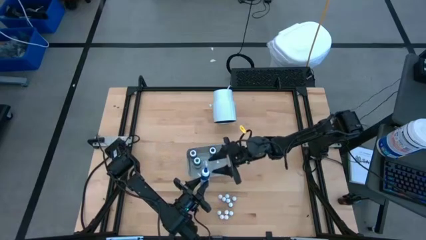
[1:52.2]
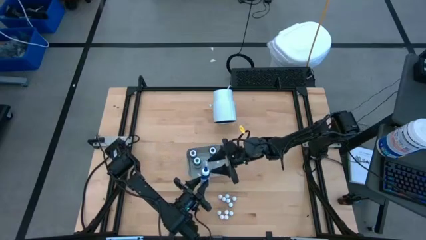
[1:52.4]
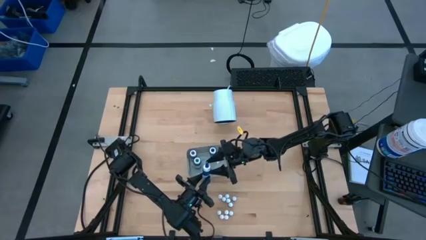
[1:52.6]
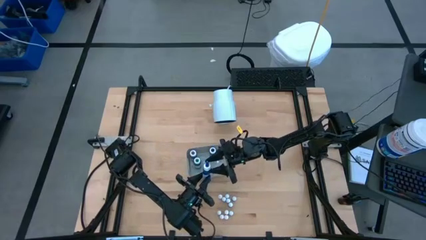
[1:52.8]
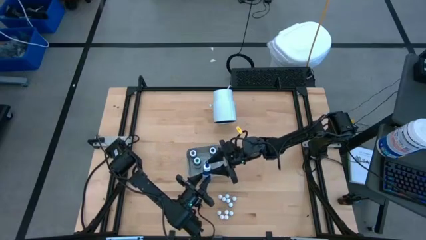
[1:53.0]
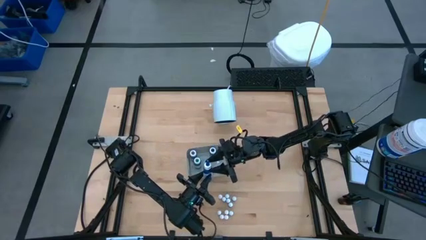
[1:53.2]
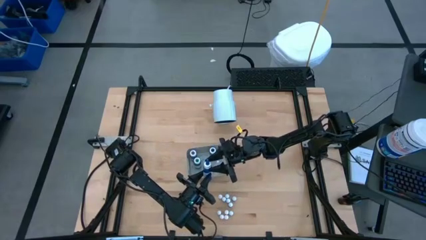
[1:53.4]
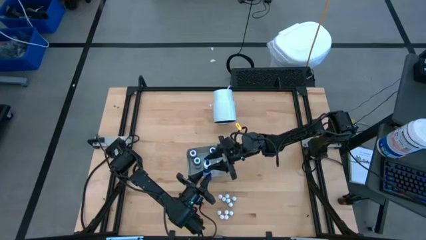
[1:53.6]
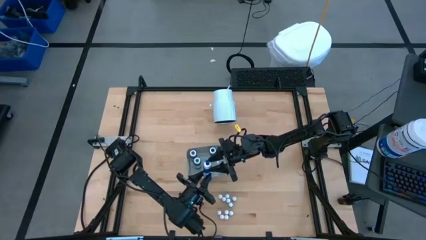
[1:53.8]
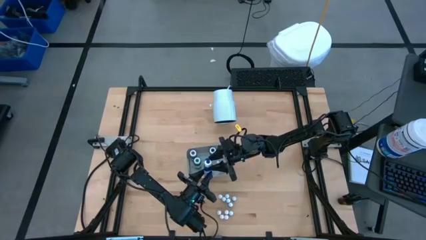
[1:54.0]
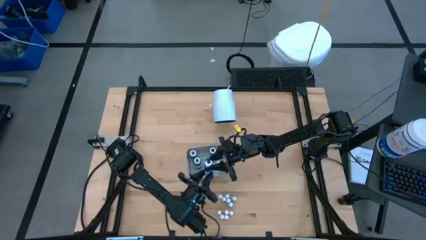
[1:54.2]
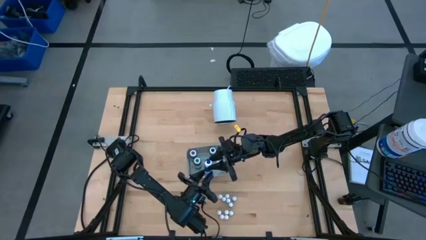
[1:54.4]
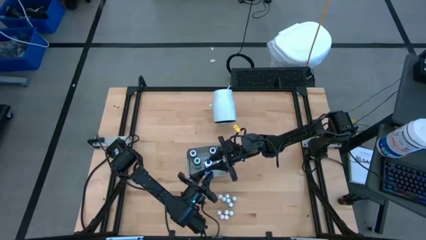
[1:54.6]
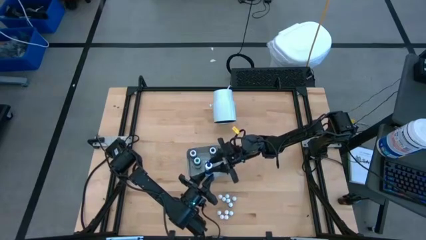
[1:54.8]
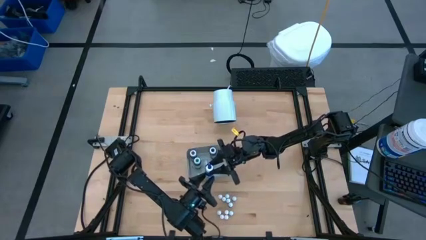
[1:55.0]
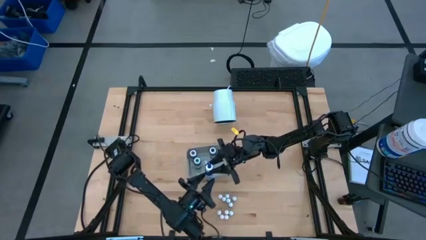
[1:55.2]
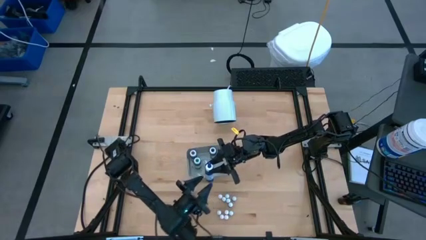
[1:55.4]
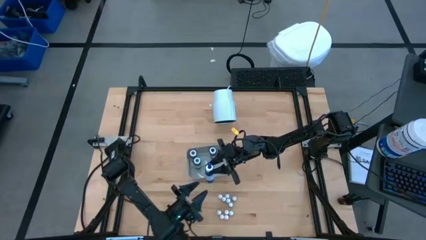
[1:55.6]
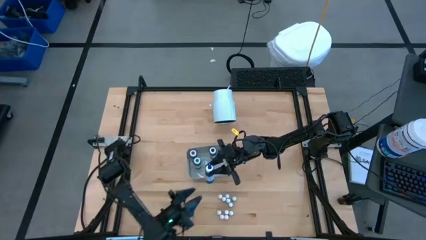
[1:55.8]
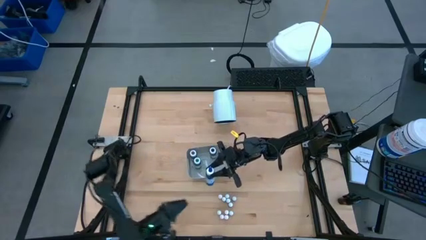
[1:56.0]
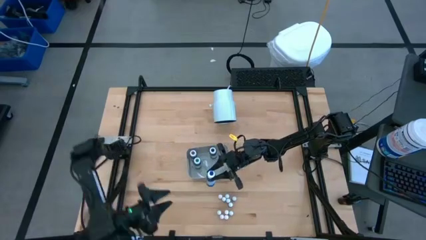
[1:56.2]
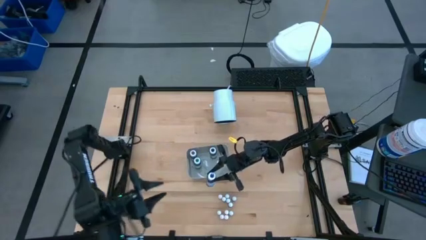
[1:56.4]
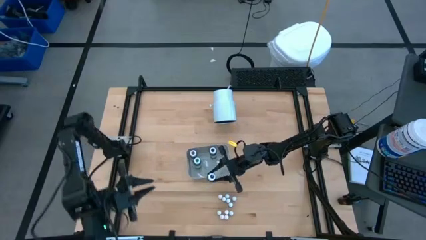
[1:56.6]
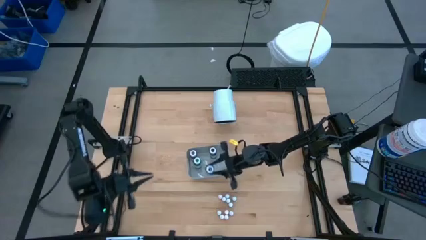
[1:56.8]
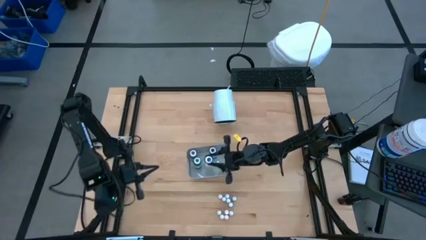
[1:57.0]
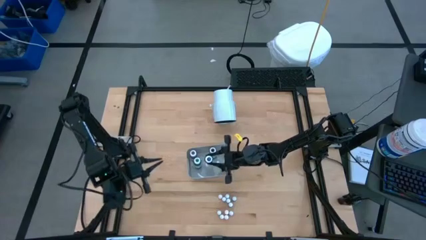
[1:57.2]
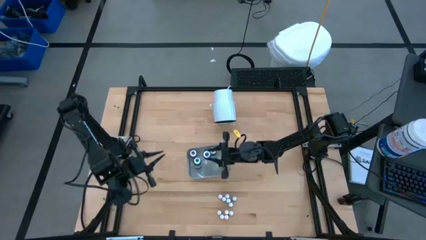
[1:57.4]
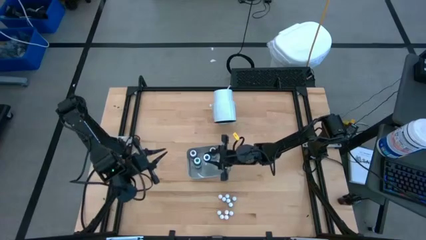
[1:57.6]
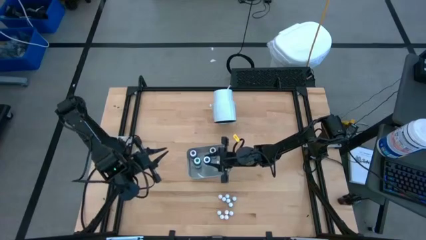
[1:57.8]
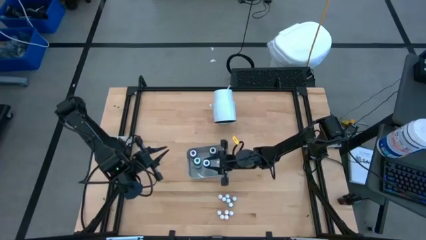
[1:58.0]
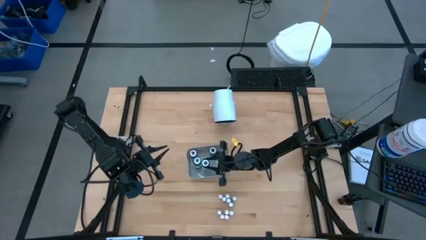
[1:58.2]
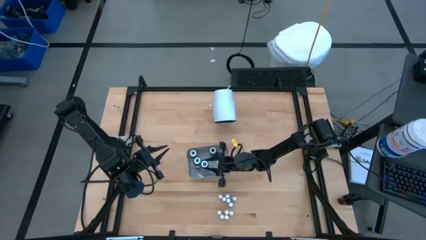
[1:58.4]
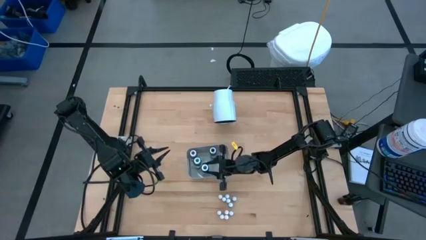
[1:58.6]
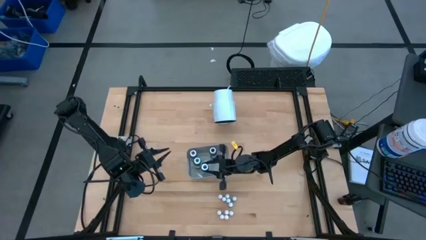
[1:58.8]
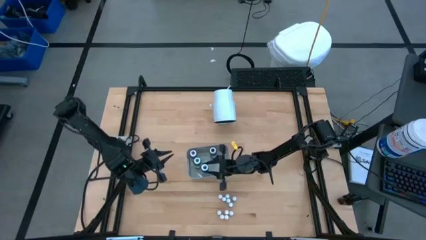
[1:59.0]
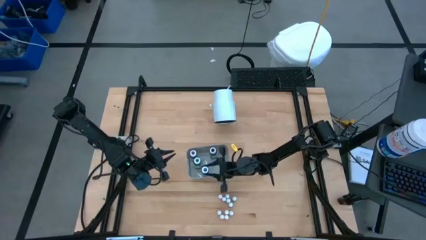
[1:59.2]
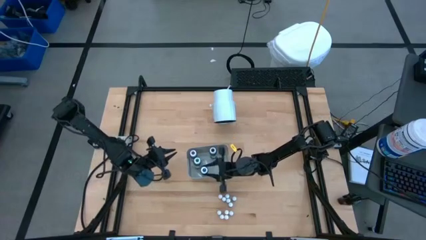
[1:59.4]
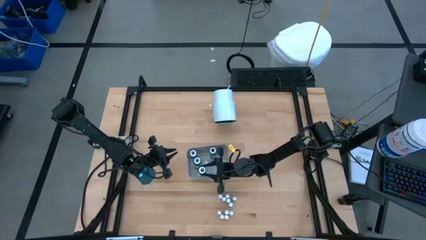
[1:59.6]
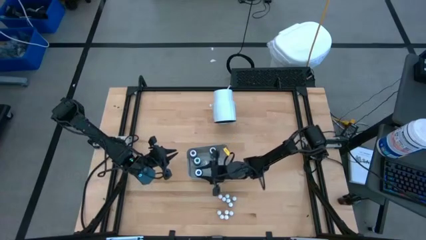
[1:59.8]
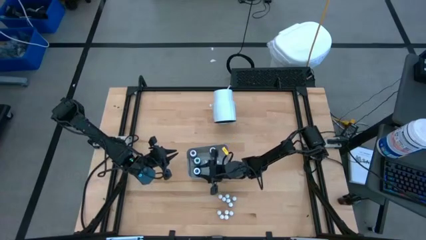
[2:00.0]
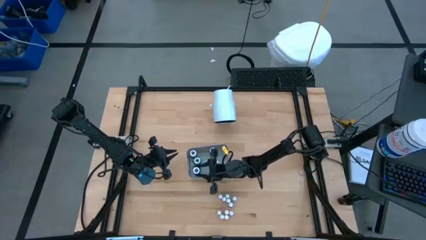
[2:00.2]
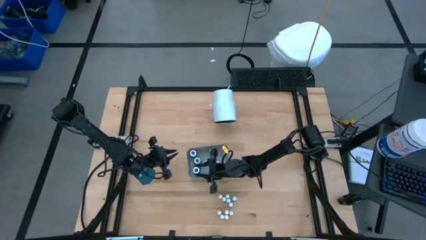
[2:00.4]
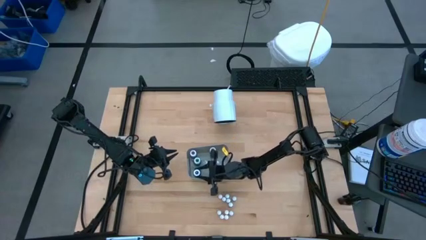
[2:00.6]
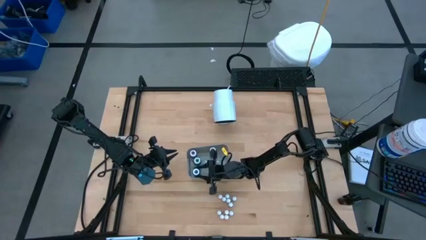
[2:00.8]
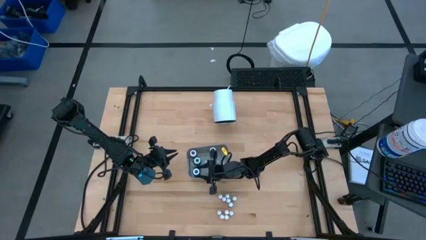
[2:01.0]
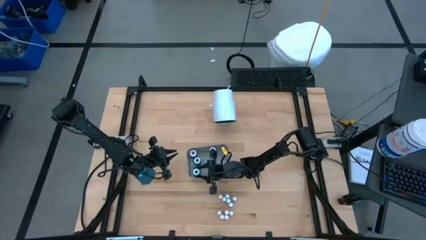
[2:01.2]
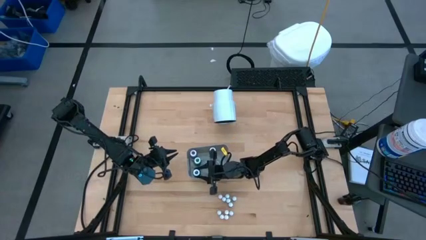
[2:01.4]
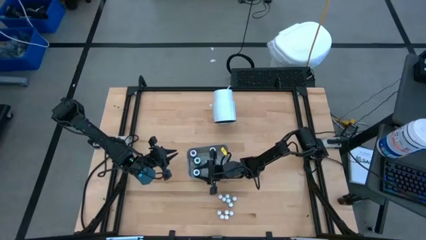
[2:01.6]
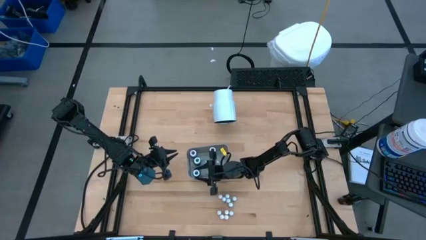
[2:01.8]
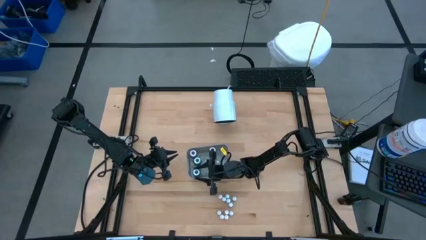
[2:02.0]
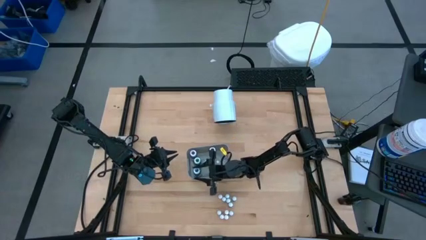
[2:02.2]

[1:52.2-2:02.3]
Task: Pick & Place food coloring
Adjust the large blue food coloring bottle on the gray bin

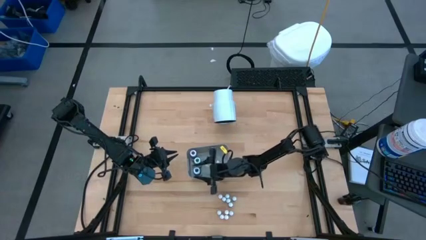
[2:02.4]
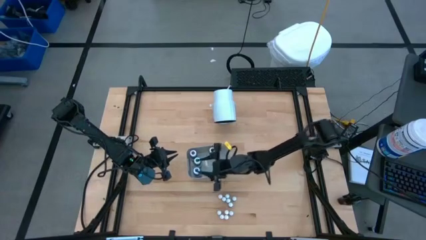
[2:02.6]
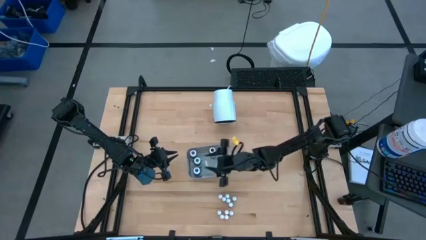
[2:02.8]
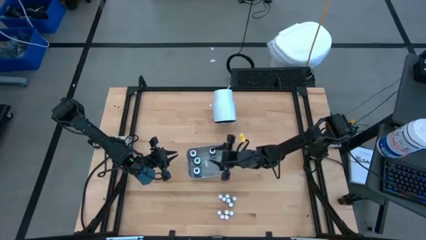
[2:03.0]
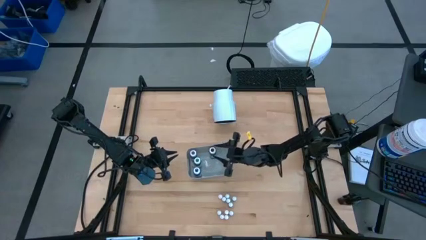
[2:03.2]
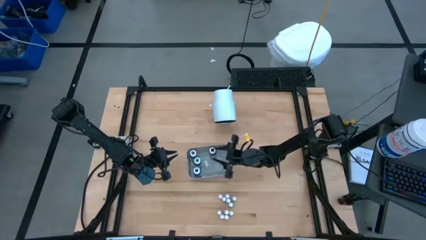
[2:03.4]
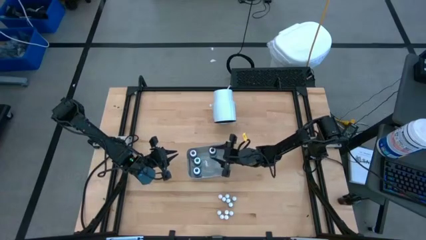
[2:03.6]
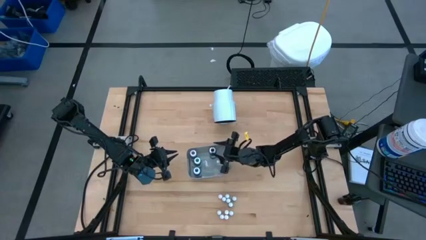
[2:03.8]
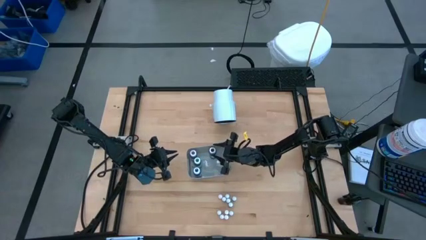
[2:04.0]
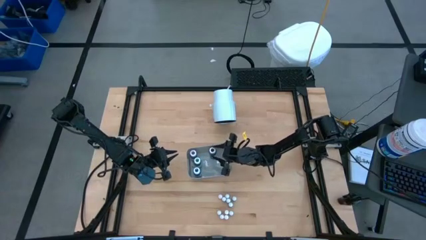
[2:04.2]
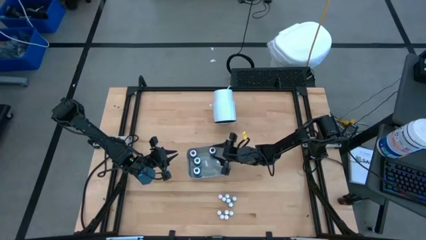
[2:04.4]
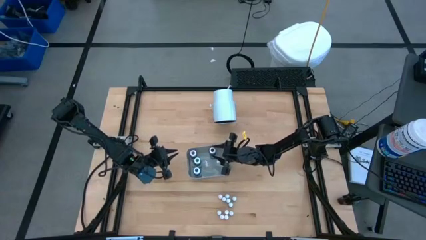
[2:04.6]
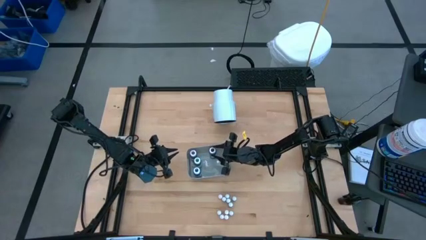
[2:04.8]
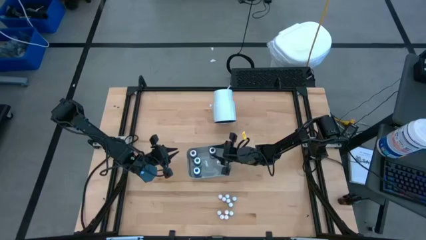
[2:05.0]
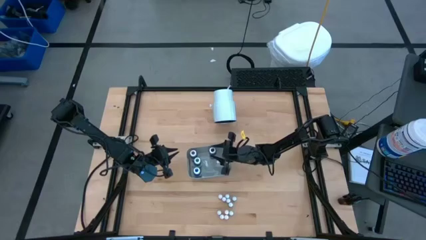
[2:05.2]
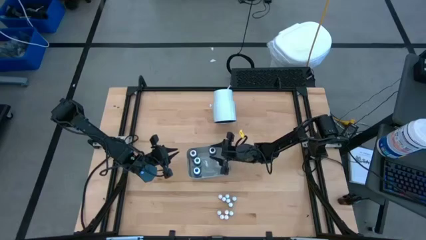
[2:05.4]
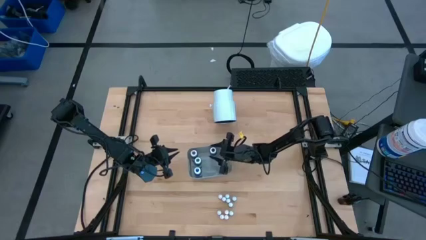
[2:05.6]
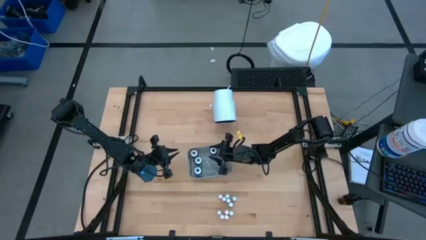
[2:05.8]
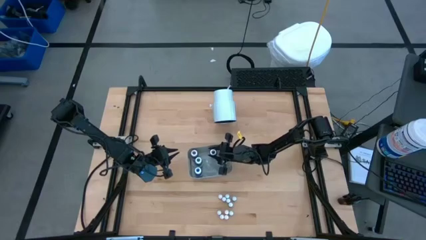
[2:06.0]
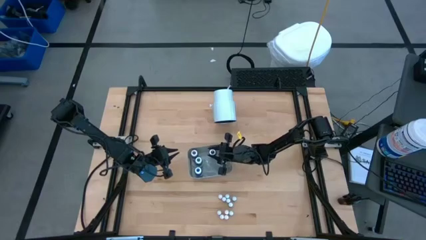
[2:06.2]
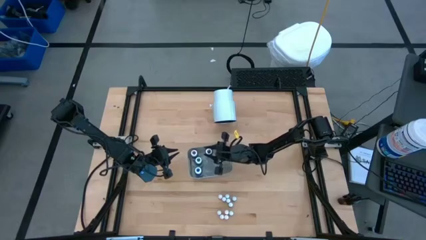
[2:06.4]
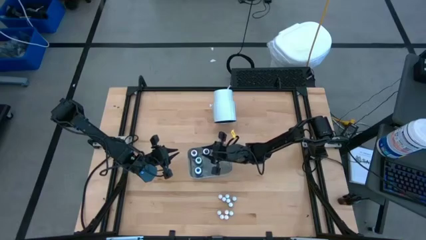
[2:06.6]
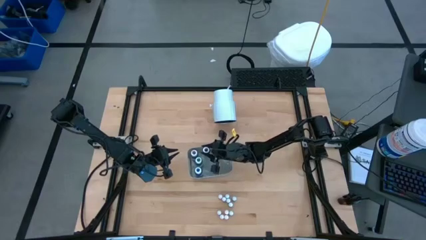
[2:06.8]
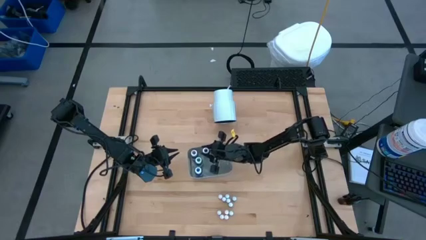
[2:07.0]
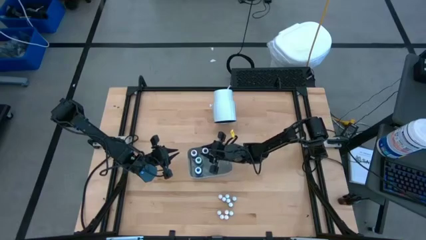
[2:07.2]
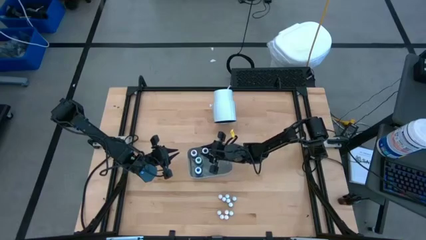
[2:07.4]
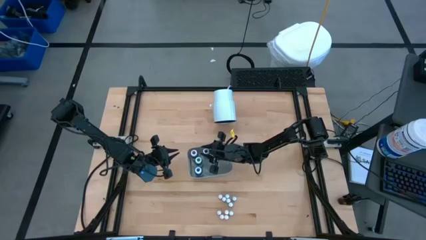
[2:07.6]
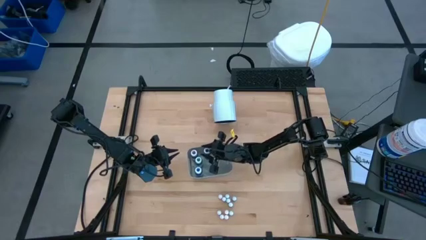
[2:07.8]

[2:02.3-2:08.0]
Adjust the large black food coloring bottle on the gray bin
